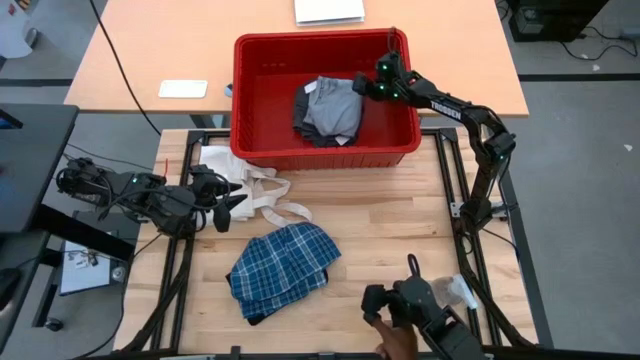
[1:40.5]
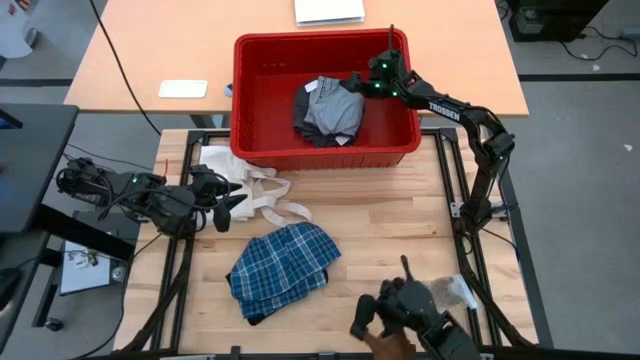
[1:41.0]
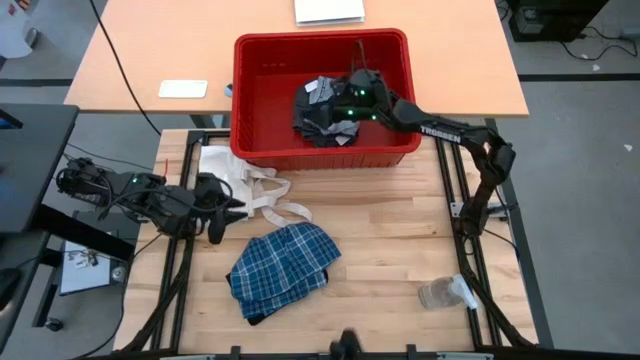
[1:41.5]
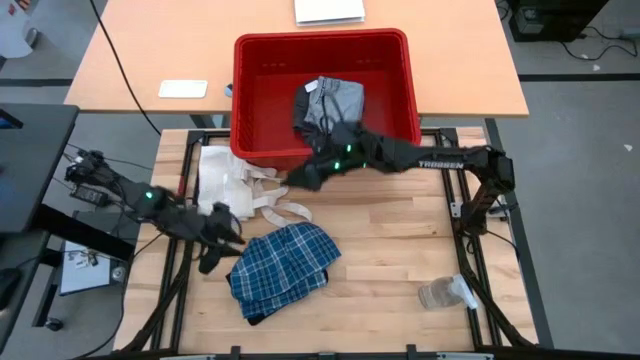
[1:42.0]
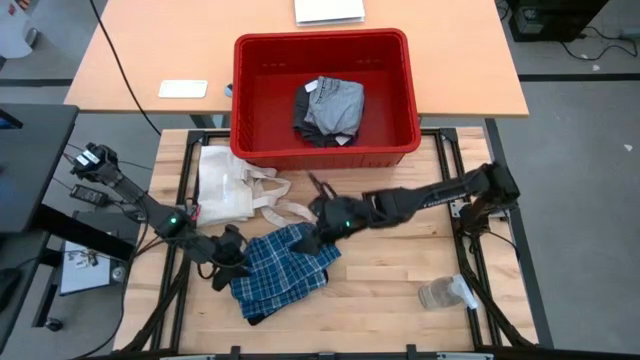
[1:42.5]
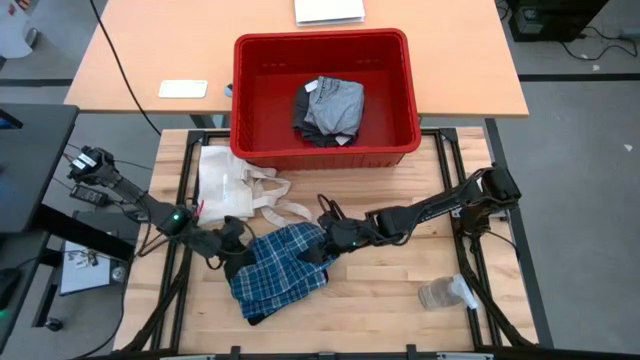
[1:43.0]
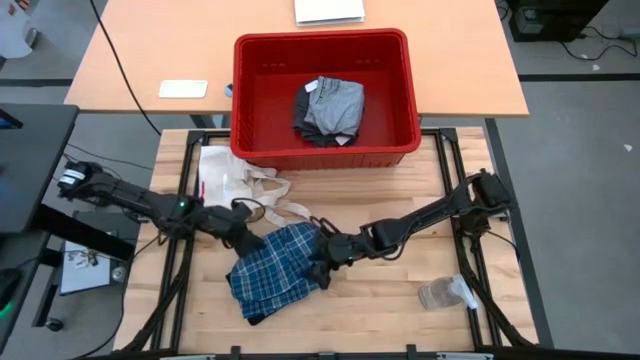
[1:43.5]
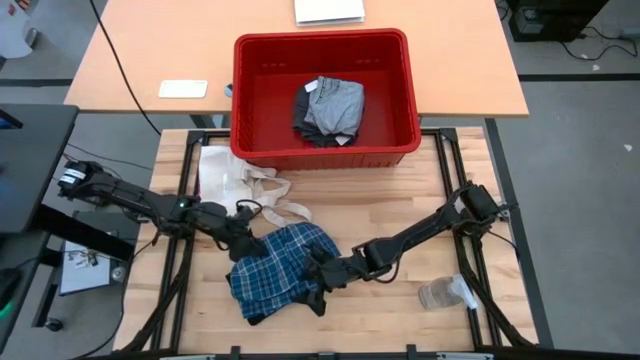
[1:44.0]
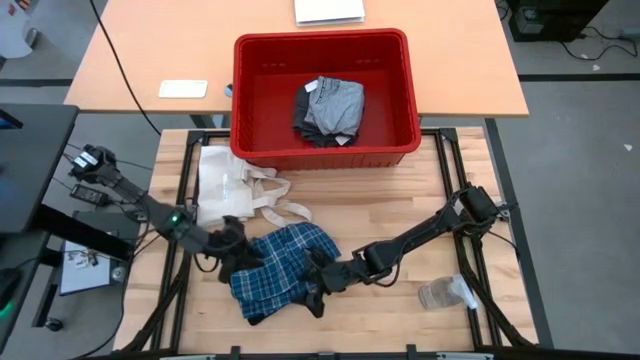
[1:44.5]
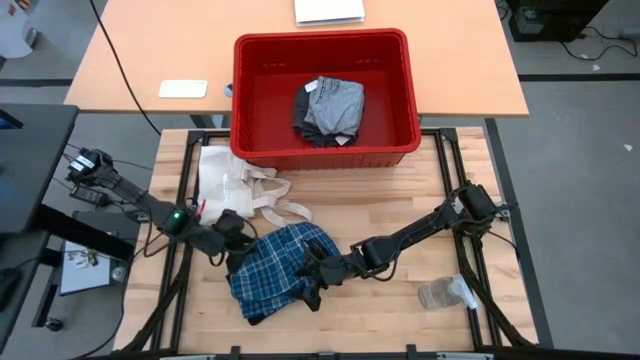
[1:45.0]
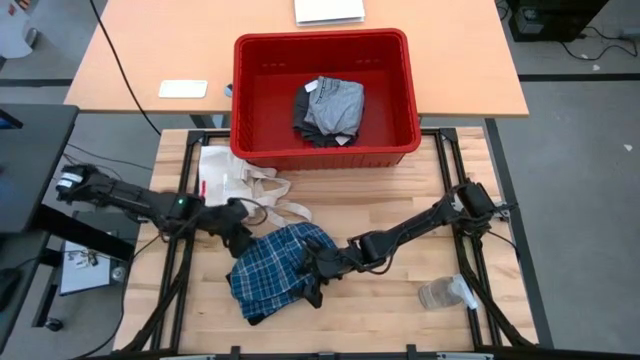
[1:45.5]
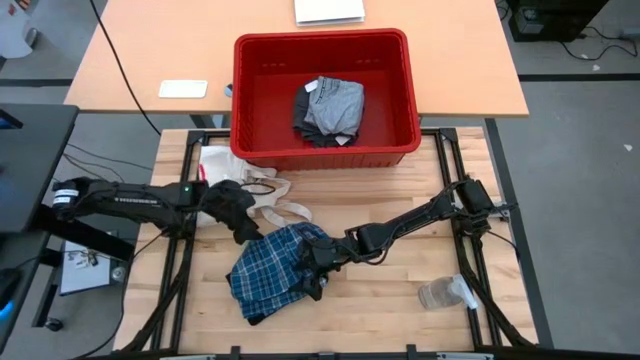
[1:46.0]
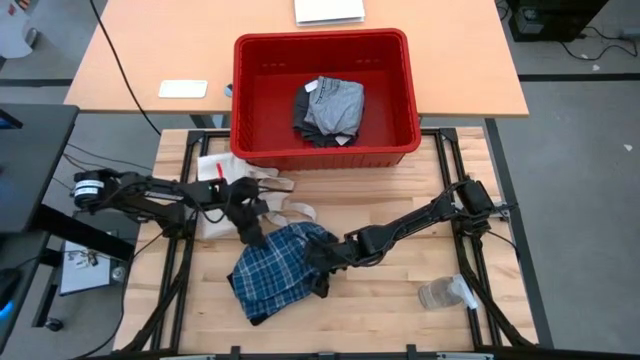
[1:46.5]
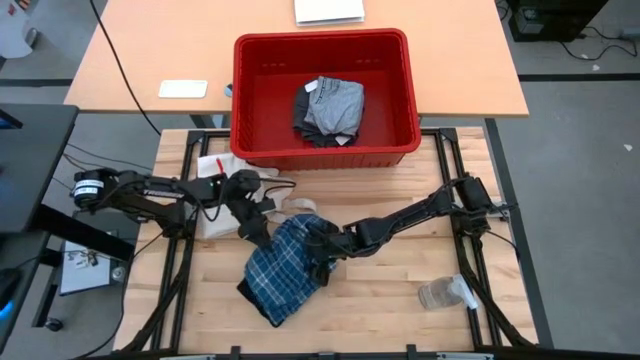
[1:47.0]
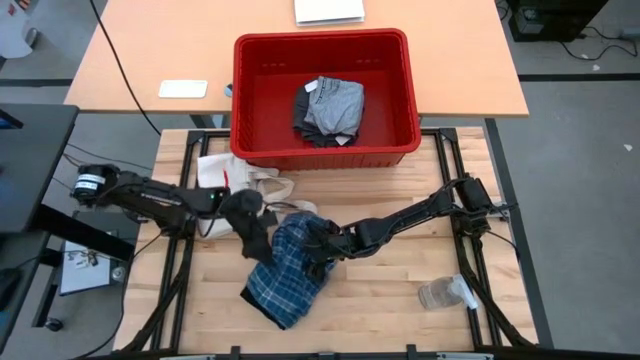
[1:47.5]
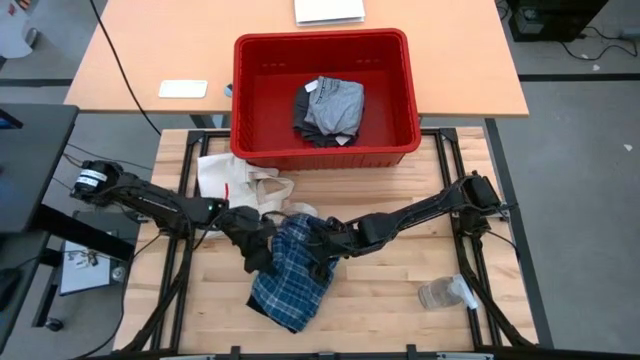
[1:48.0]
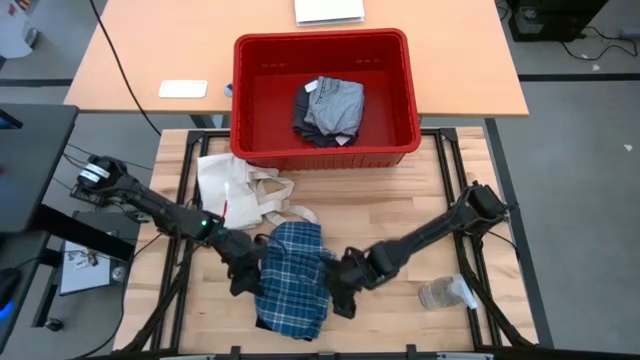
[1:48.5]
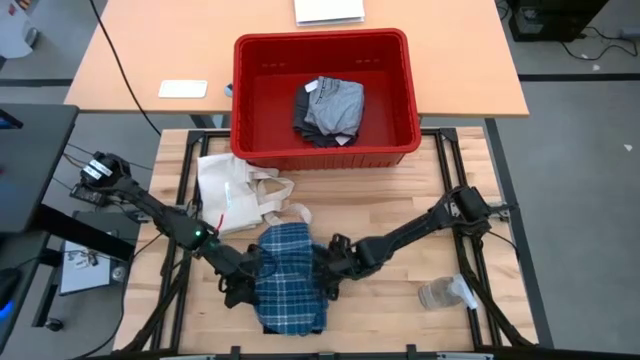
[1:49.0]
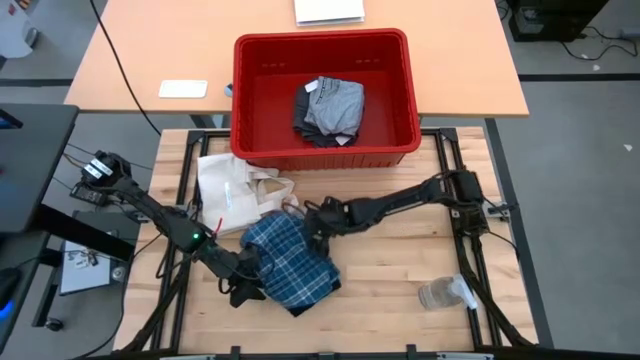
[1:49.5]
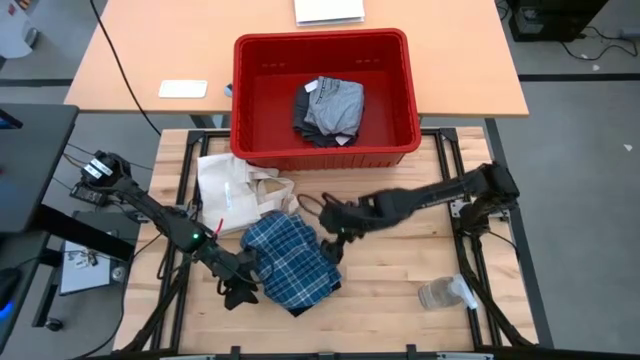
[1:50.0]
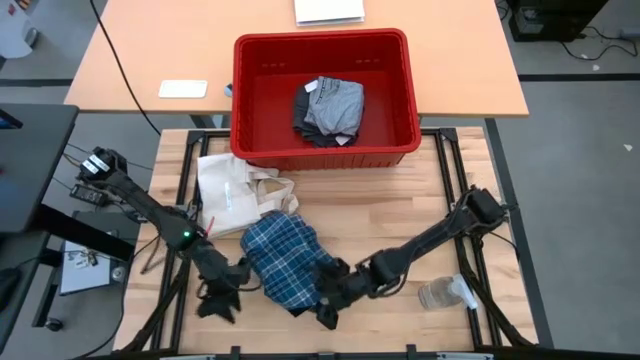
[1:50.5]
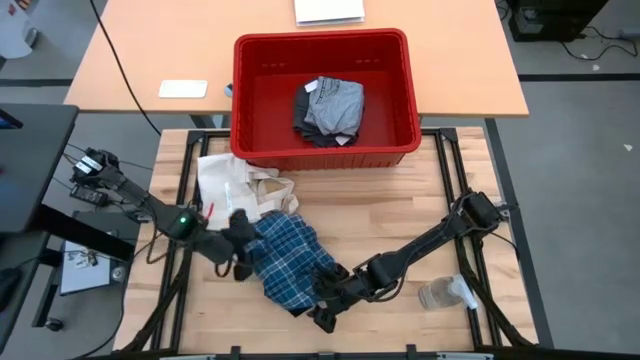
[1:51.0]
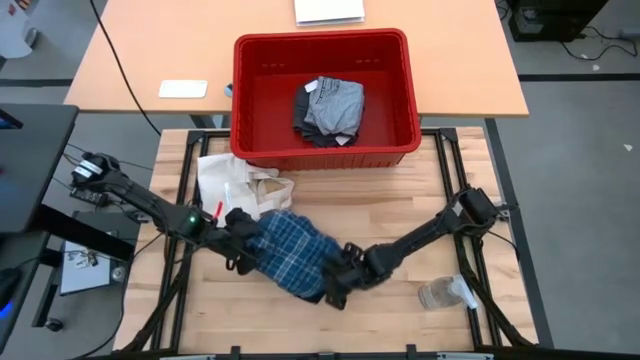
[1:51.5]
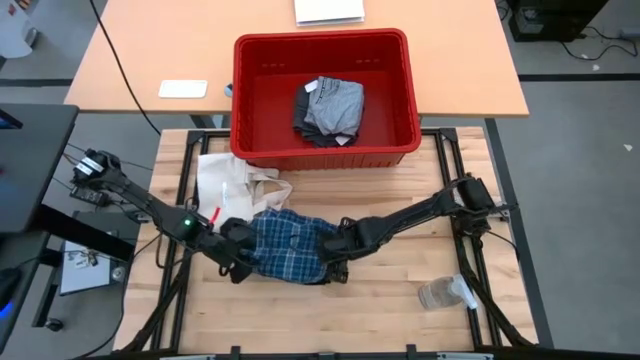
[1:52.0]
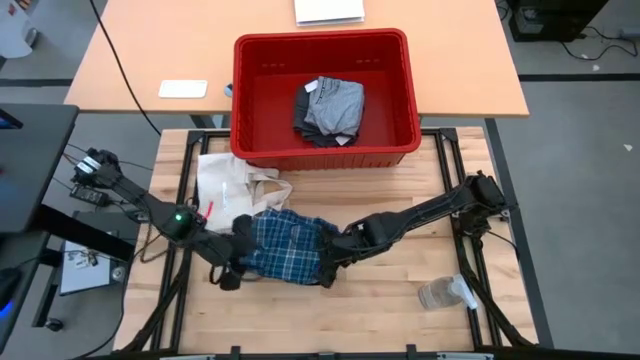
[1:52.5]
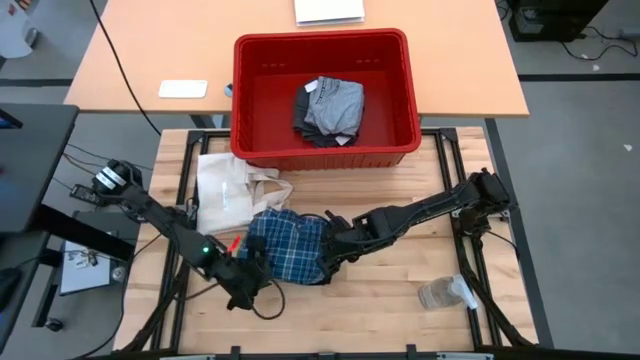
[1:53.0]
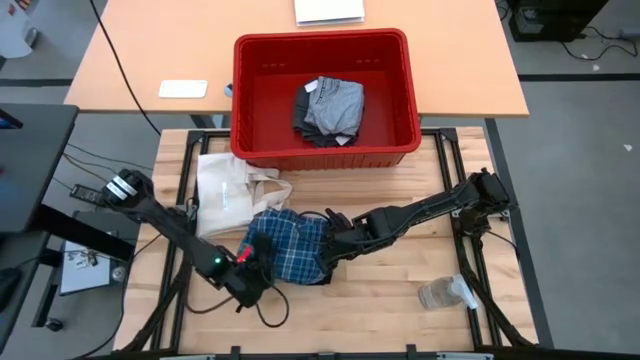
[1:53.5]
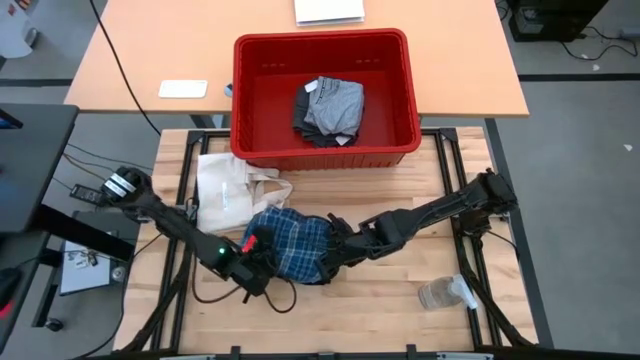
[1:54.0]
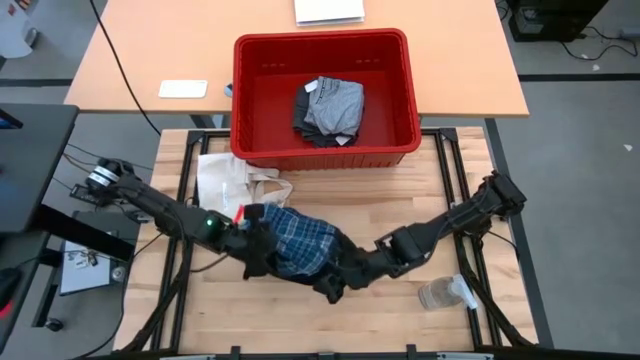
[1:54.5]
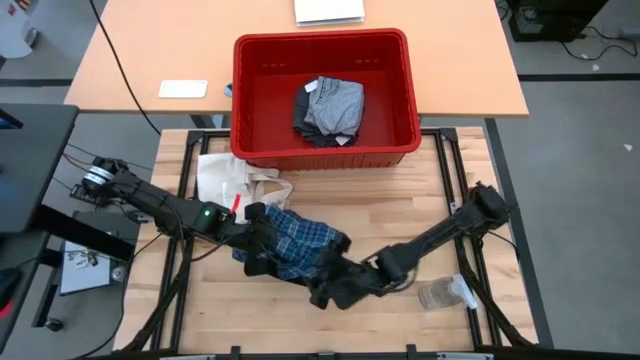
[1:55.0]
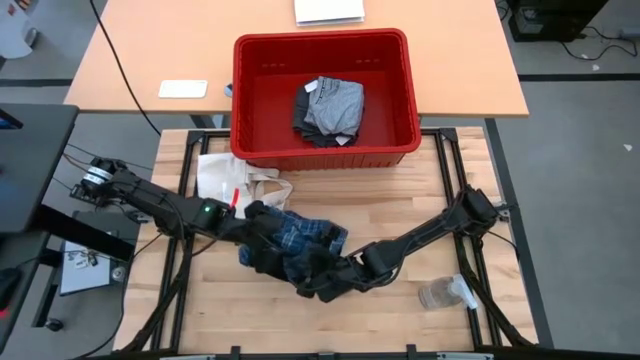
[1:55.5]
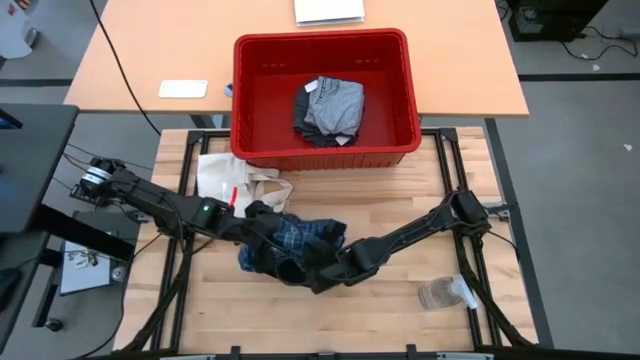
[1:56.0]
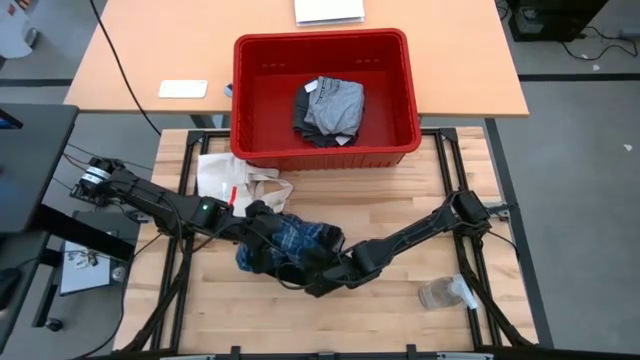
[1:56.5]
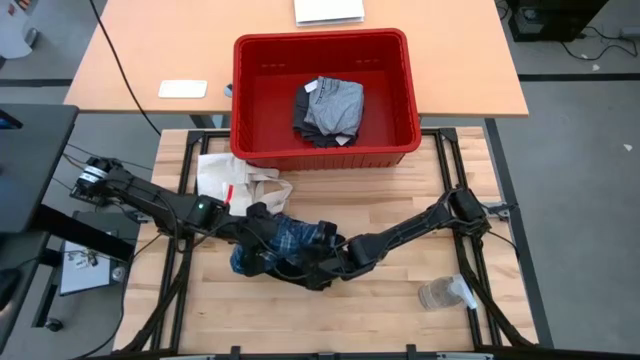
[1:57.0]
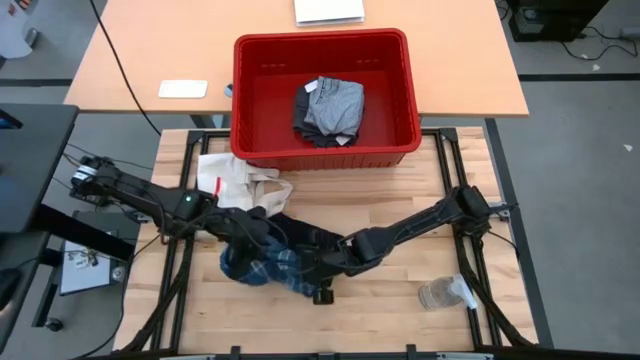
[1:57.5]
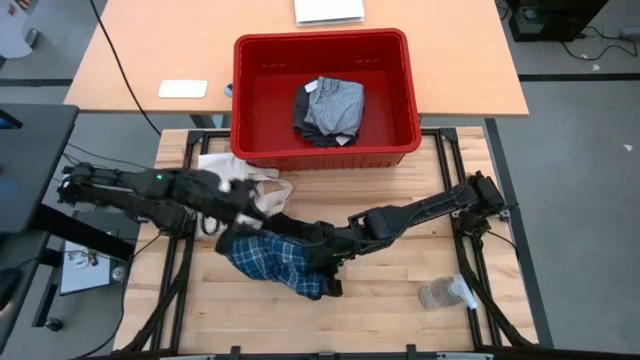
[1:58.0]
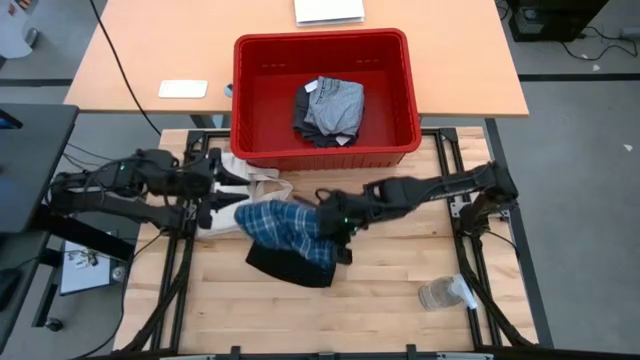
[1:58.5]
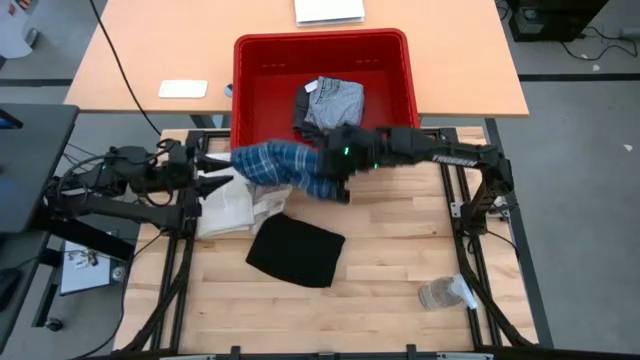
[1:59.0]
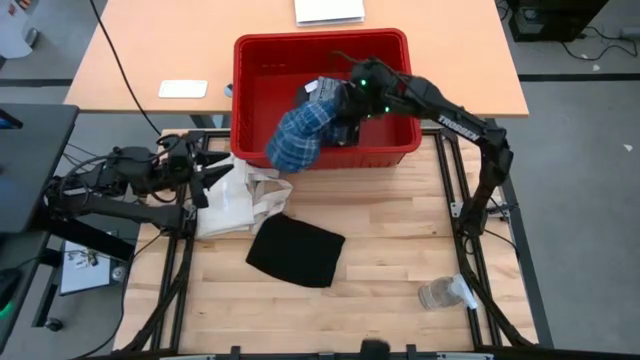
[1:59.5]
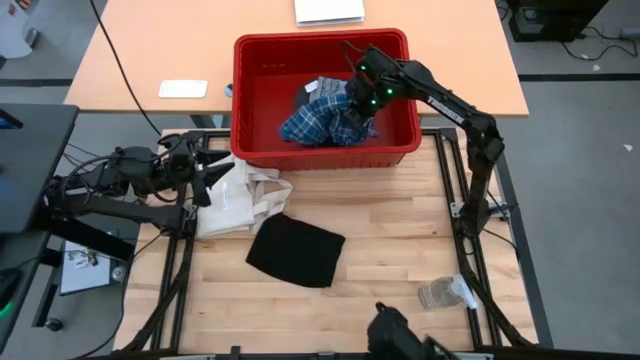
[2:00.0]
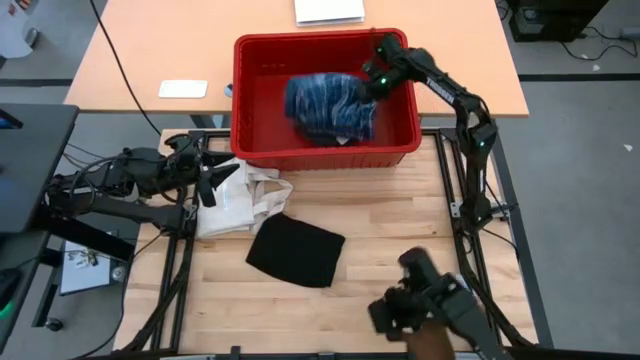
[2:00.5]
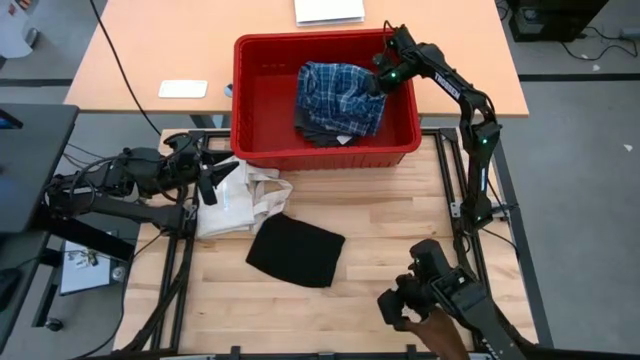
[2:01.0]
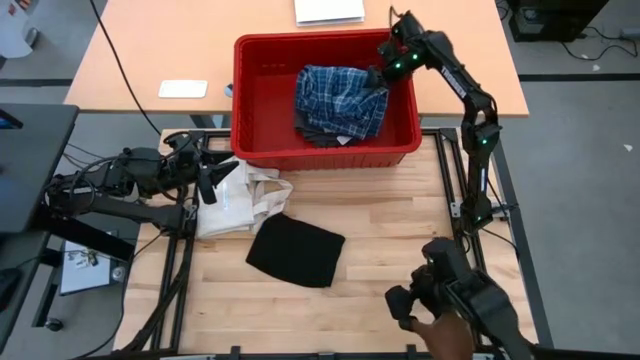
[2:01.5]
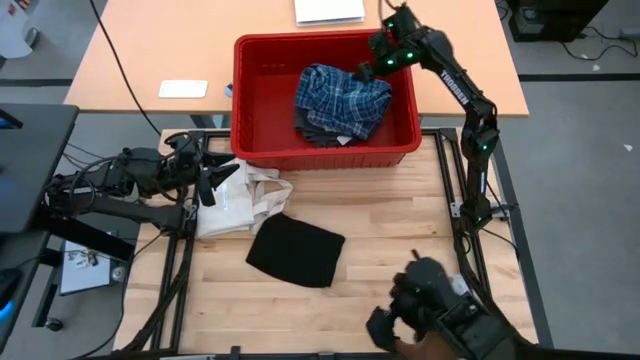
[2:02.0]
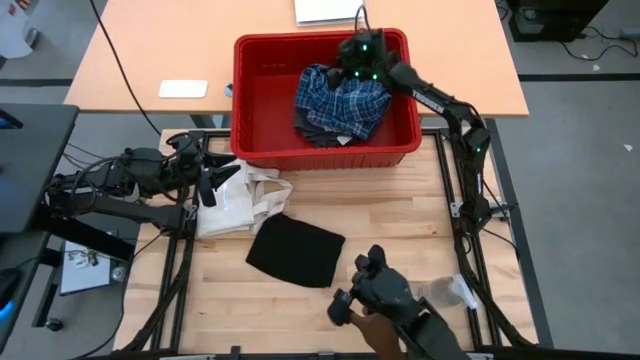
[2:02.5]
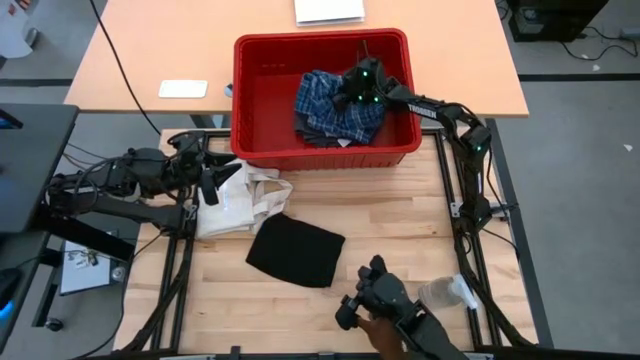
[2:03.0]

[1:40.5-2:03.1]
Task: Fold laundry
Put the blue pants into the red bin
